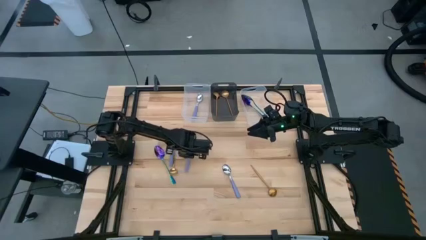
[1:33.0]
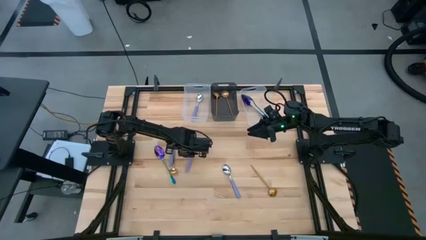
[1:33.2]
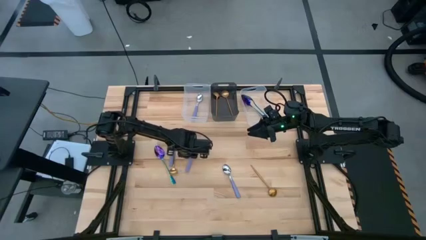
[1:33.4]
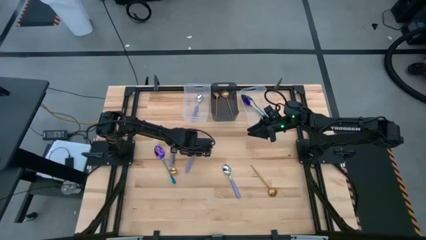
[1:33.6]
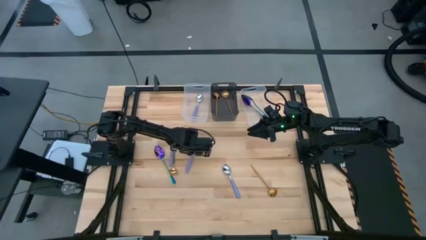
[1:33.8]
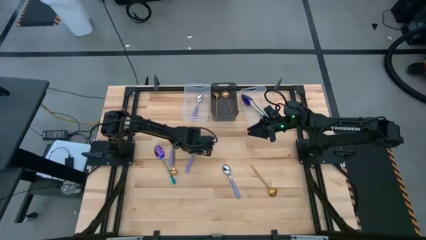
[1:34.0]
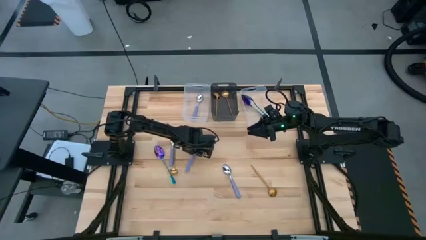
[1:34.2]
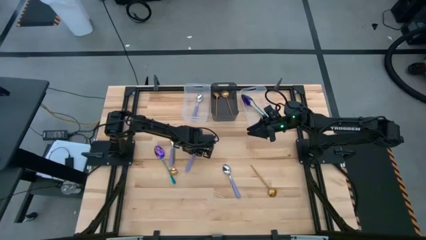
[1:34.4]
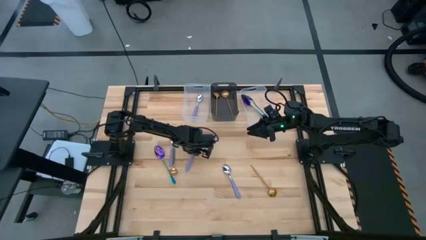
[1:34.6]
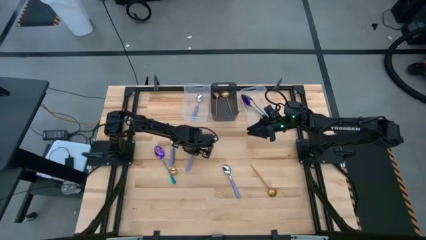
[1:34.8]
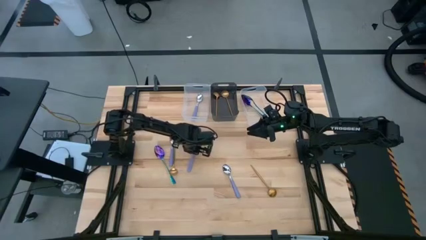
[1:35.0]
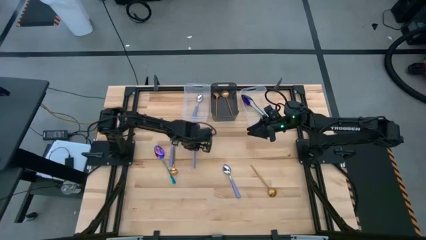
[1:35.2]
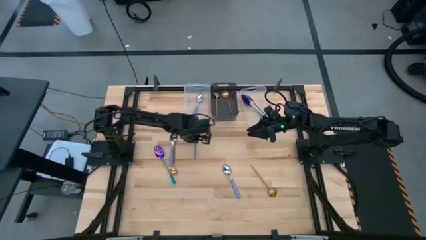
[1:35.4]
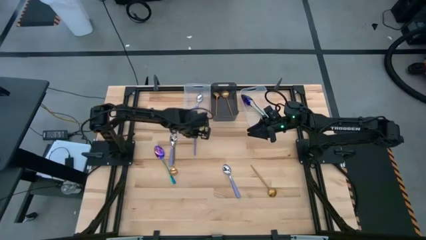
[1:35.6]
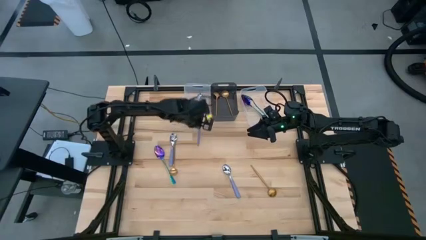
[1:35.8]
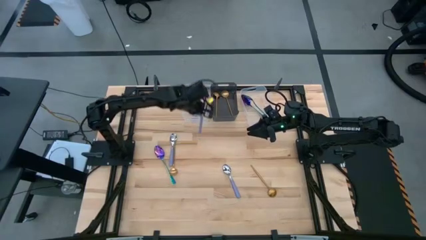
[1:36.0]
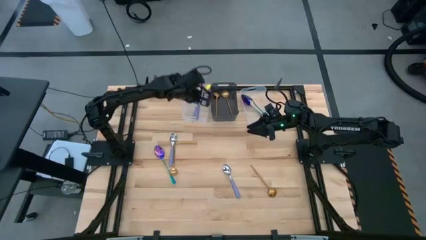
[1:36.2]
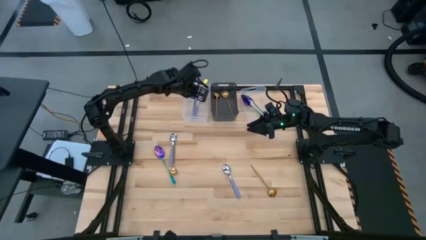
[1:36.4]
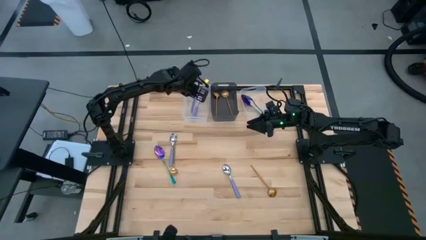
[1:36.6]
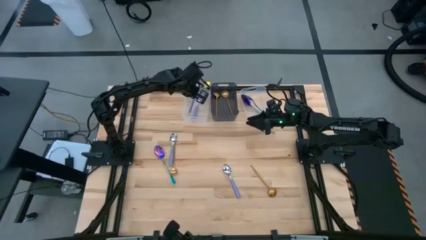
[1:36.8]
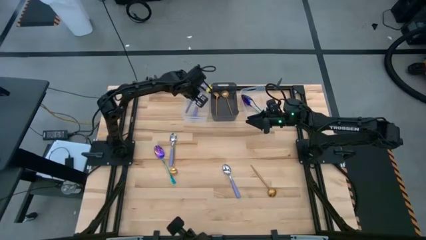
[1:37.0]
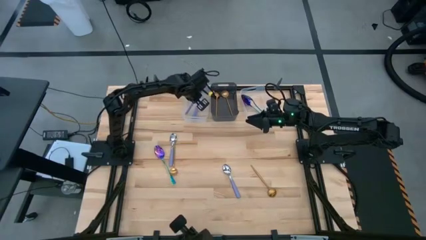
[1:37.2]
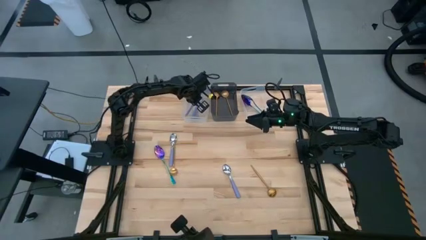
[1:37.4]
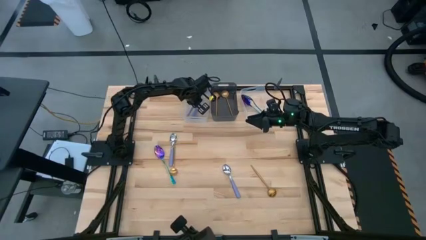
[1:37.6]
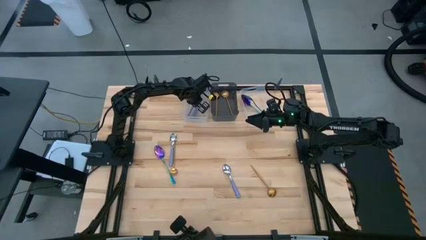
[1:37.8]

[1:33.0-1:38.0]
Task: Sort silverware by color (type)
Put the purple spoon into the left transparent bin

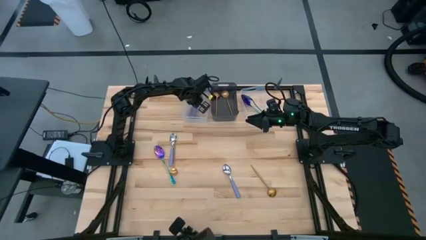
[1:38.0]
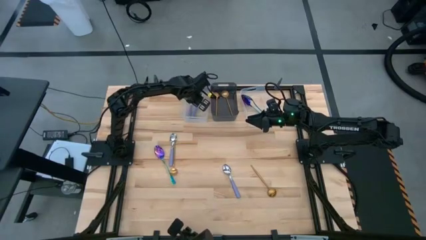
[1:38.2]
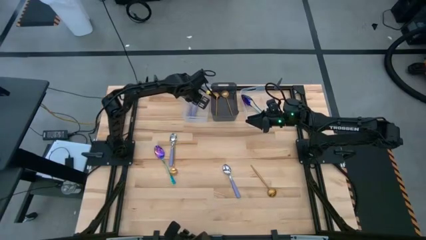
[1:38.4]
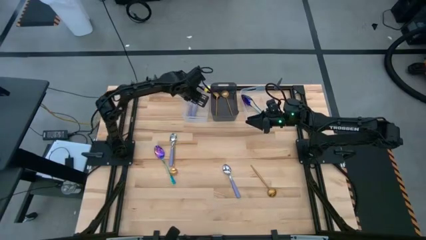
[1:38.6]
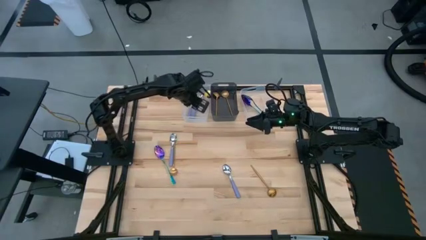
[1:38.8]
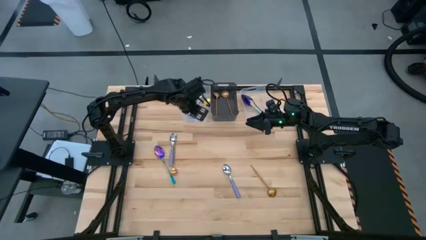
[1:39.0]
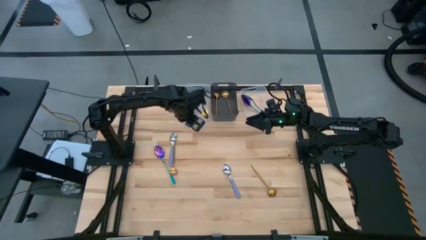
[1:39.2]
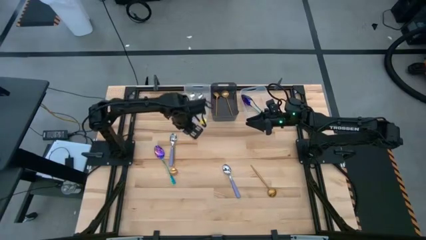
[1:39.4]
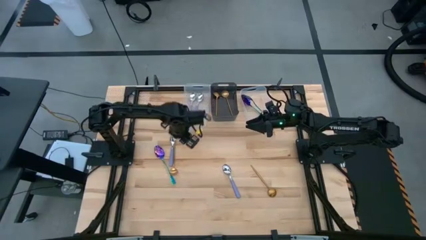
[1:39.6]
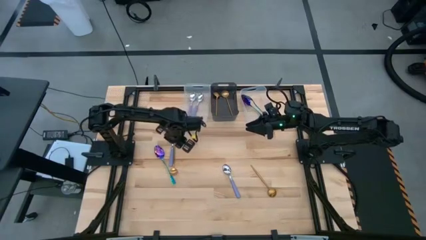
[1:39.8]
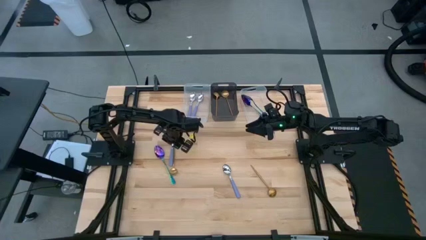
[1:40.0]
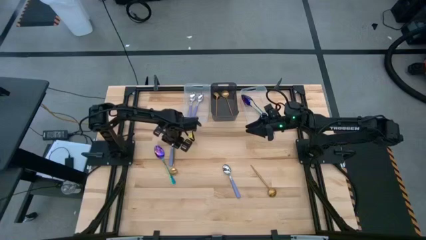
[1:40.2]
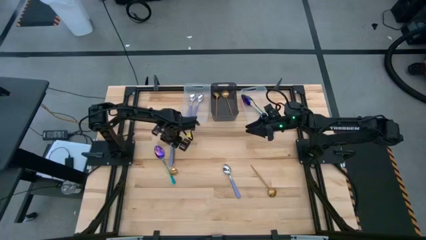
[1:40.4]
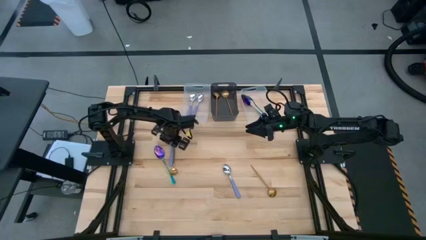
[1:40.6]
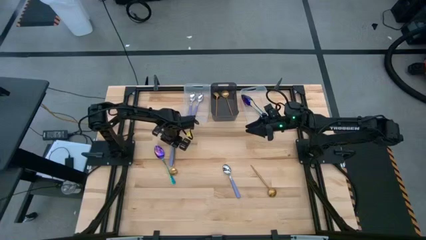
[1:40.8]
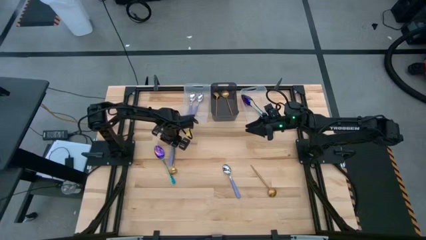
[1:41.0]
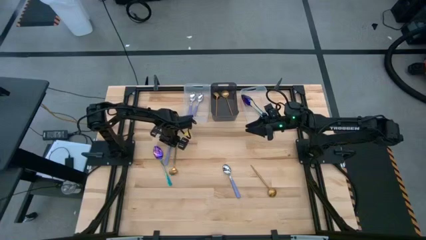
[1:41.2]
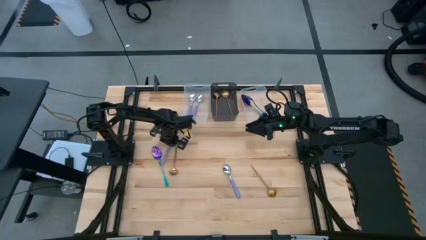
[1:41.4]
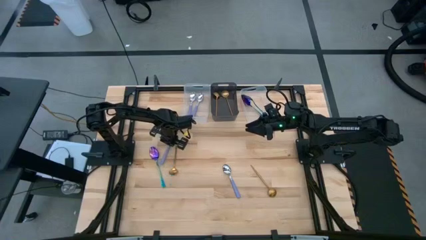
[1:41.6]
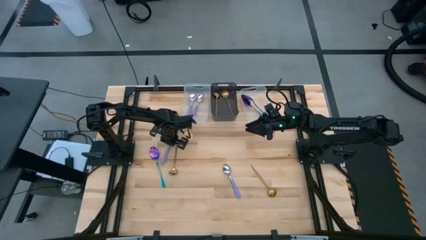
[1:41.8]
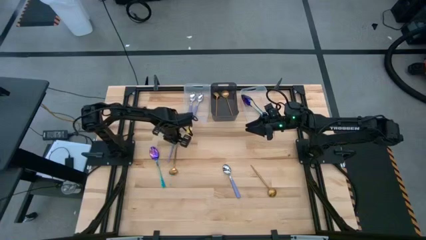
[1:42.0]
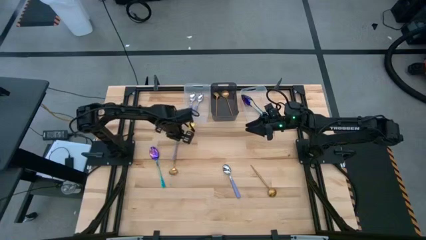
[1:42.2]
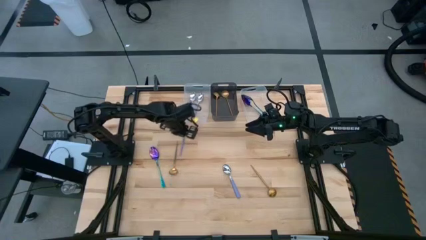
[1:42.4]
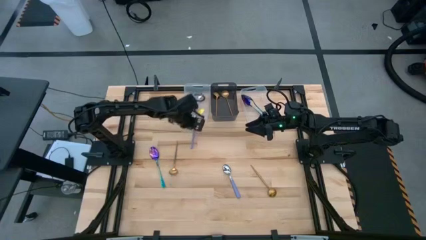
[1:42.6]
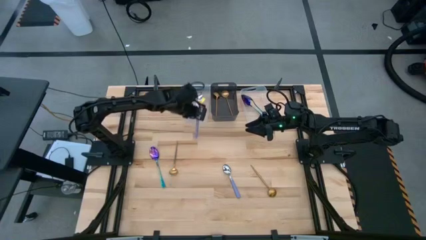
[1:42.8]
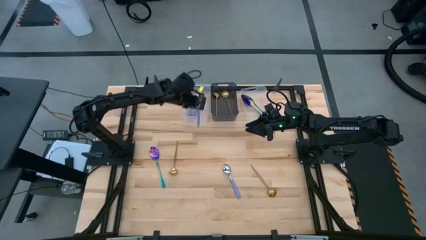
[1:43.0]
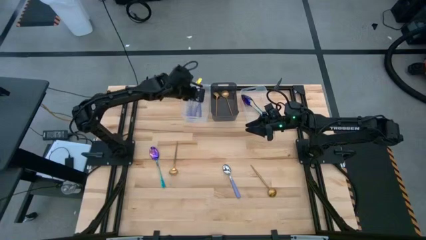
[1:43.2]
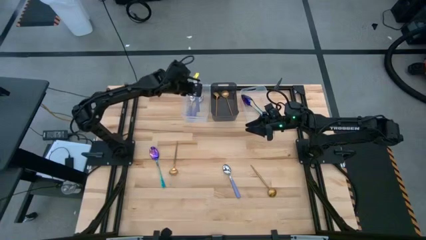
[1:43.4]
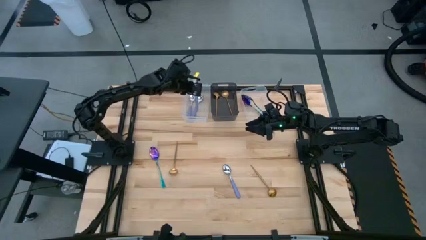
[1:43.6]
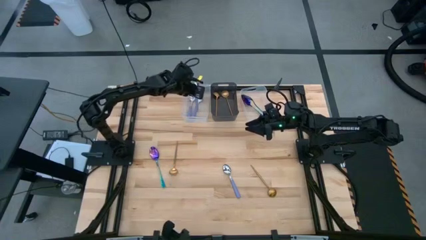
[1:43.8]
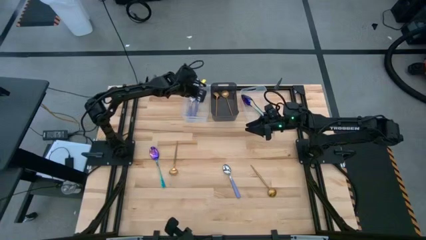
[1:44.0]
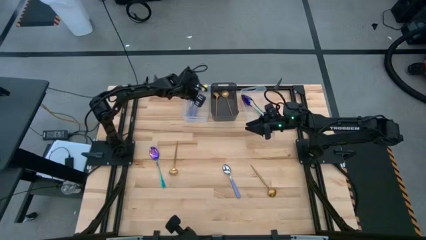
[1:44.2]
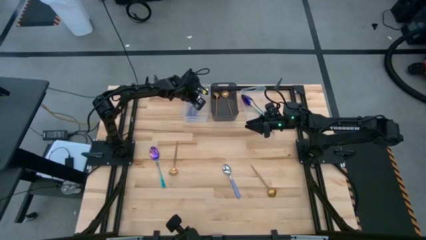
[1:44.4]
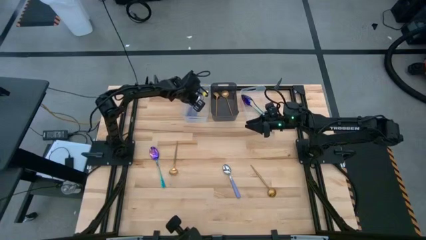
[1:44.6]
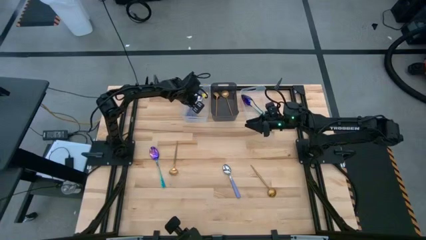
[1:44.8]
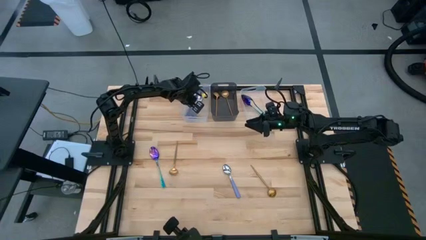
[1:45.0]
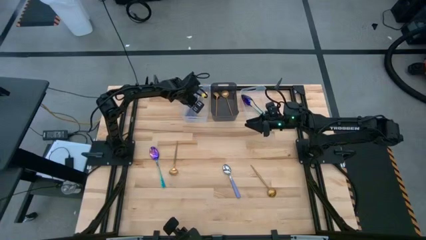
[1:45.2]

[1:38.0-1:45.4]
Put the purple spoon into the left transparent bin
